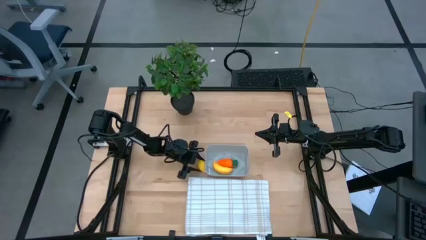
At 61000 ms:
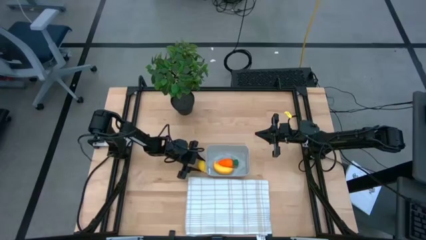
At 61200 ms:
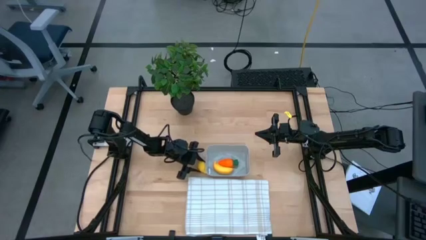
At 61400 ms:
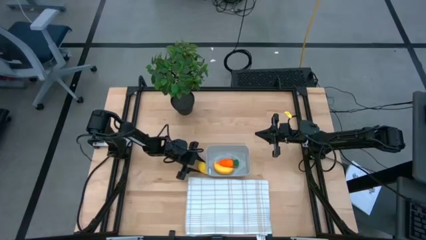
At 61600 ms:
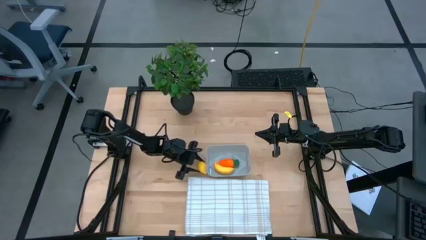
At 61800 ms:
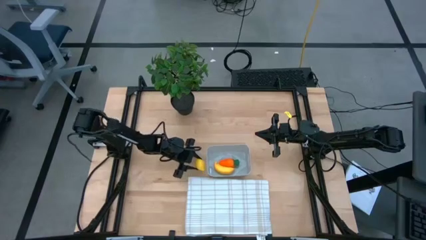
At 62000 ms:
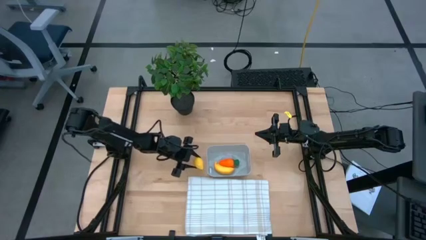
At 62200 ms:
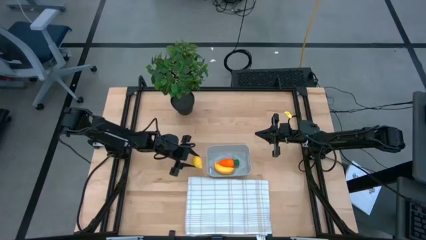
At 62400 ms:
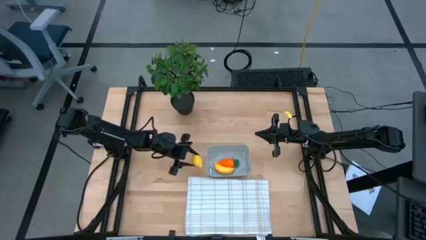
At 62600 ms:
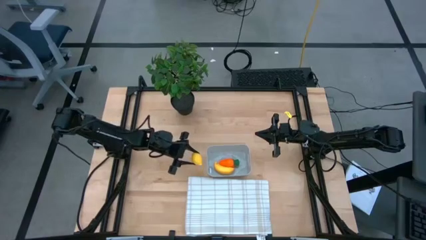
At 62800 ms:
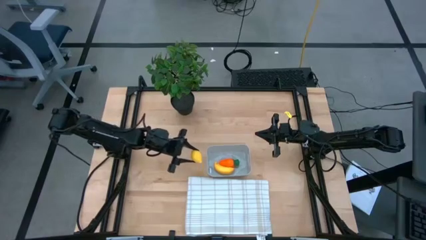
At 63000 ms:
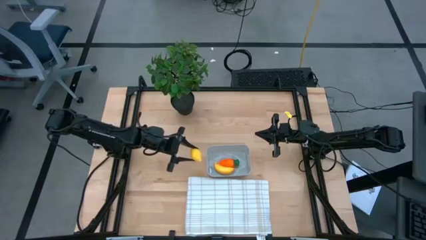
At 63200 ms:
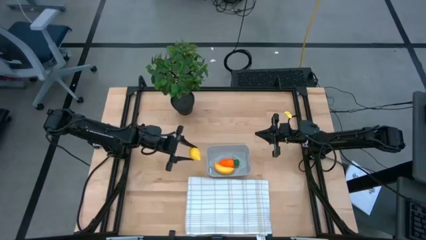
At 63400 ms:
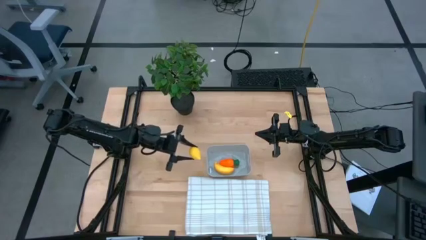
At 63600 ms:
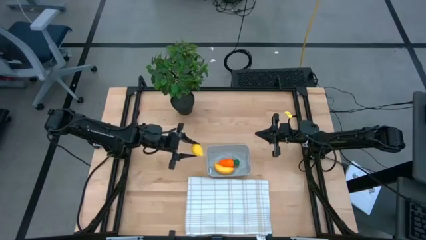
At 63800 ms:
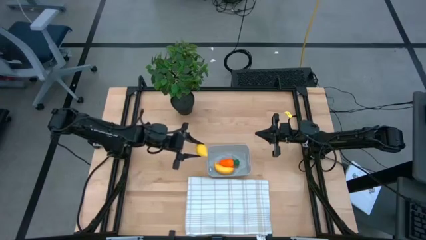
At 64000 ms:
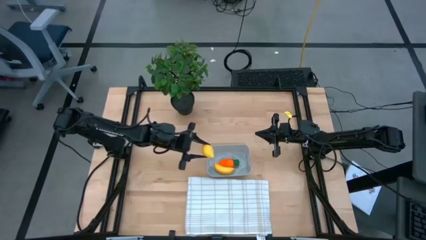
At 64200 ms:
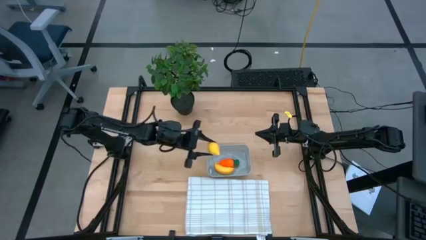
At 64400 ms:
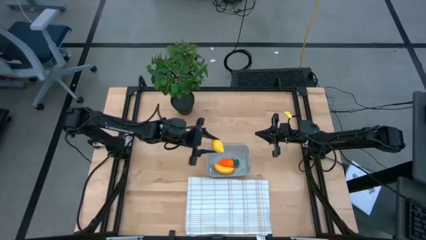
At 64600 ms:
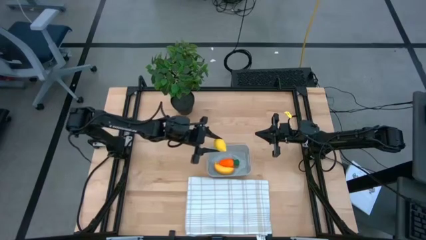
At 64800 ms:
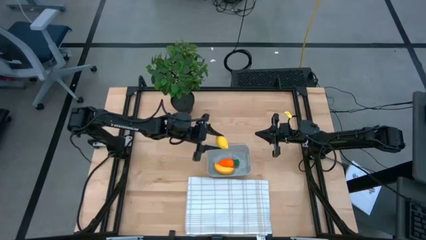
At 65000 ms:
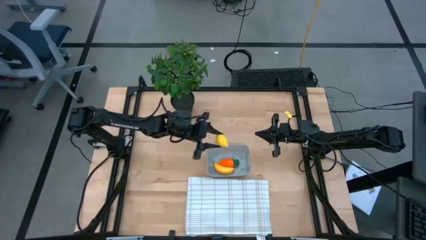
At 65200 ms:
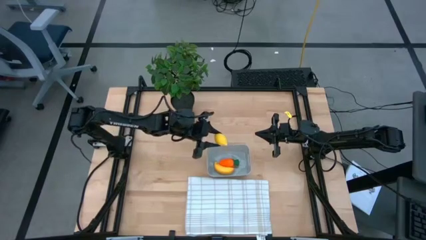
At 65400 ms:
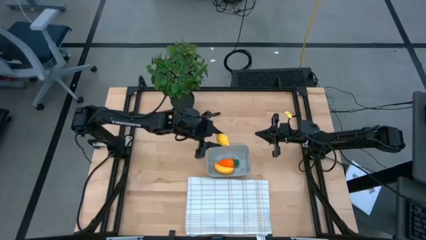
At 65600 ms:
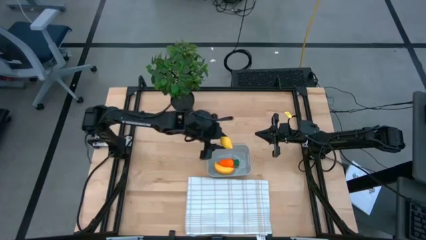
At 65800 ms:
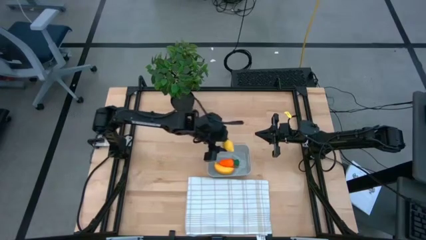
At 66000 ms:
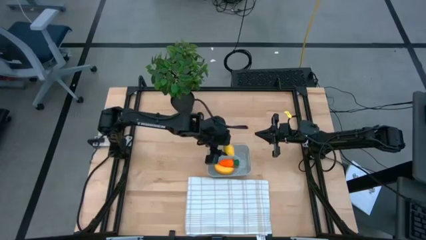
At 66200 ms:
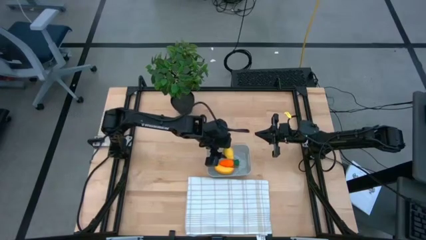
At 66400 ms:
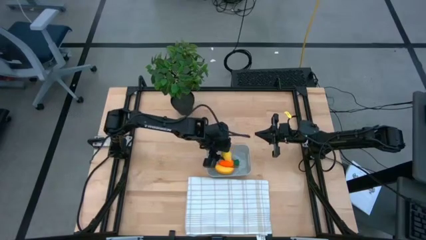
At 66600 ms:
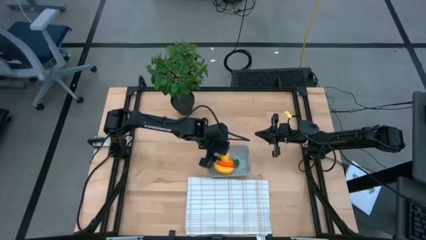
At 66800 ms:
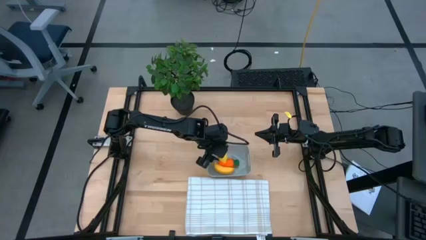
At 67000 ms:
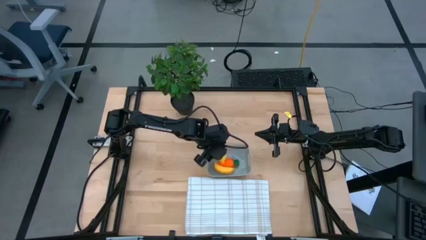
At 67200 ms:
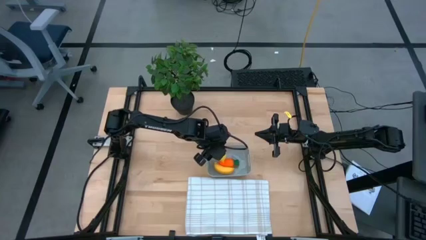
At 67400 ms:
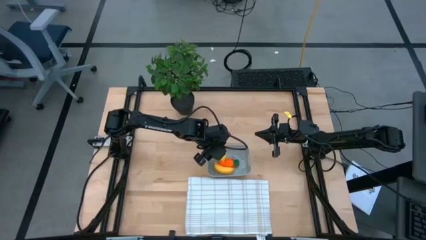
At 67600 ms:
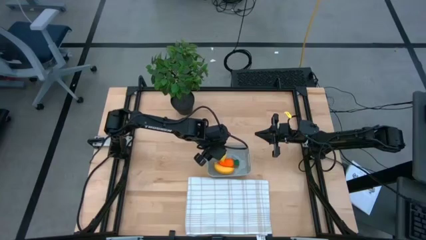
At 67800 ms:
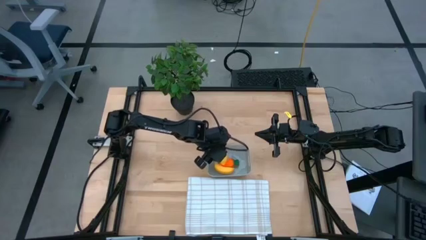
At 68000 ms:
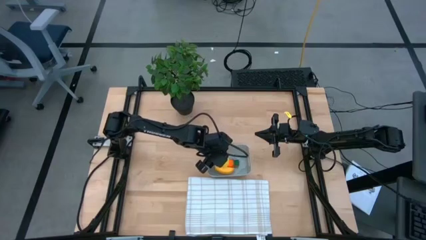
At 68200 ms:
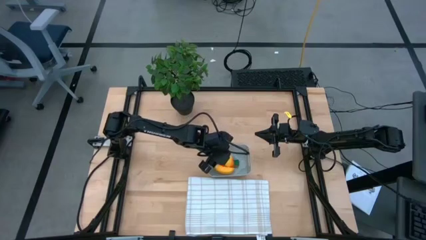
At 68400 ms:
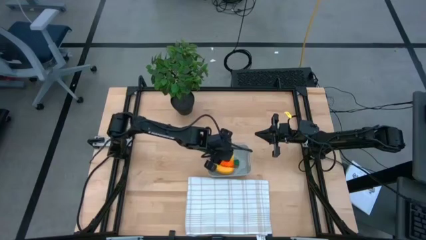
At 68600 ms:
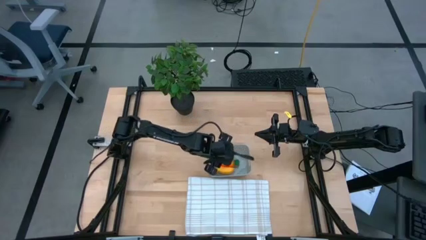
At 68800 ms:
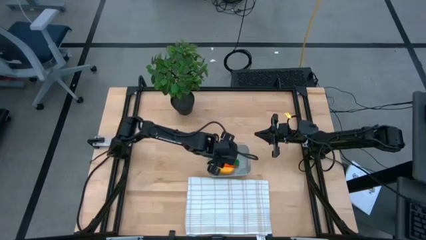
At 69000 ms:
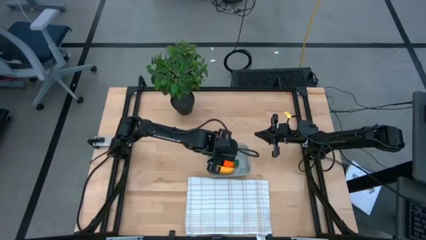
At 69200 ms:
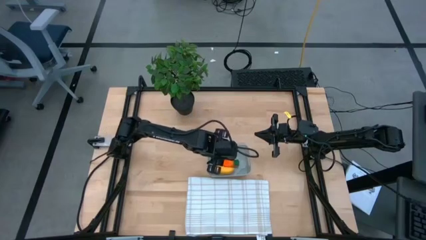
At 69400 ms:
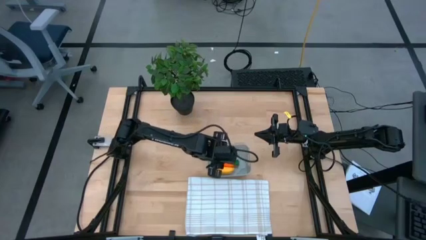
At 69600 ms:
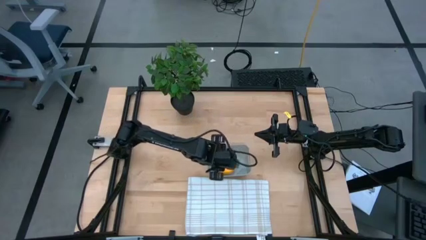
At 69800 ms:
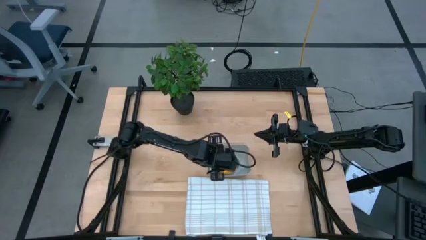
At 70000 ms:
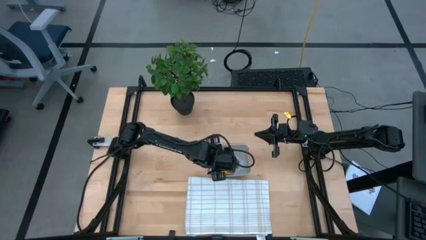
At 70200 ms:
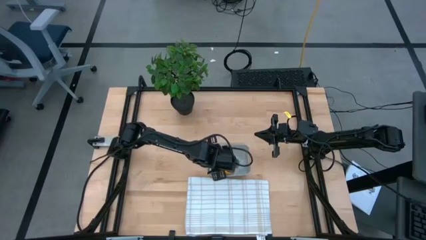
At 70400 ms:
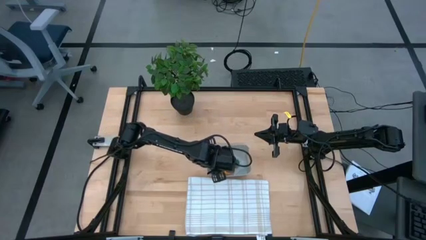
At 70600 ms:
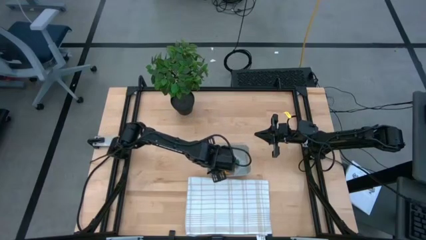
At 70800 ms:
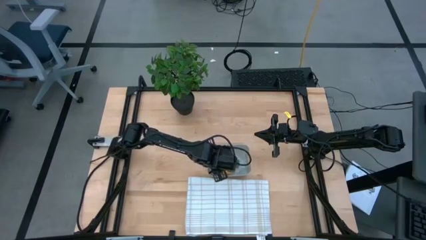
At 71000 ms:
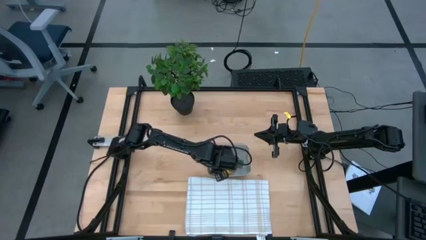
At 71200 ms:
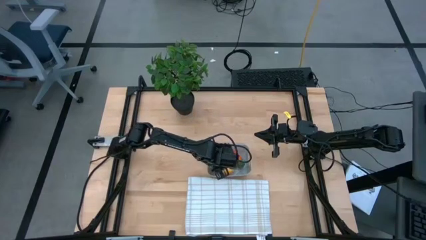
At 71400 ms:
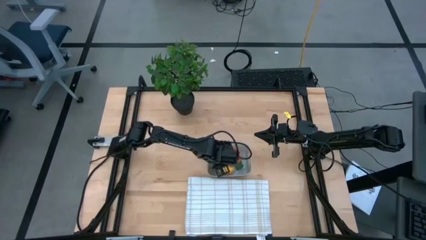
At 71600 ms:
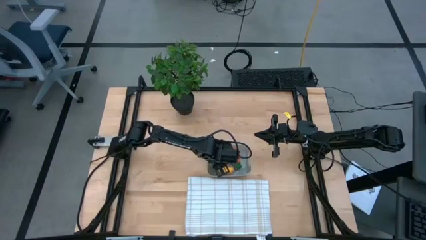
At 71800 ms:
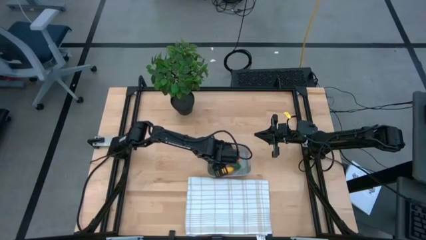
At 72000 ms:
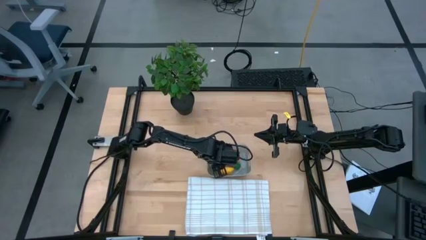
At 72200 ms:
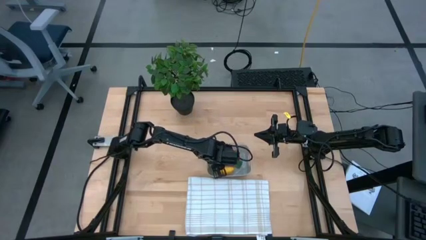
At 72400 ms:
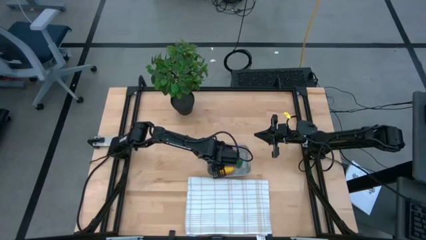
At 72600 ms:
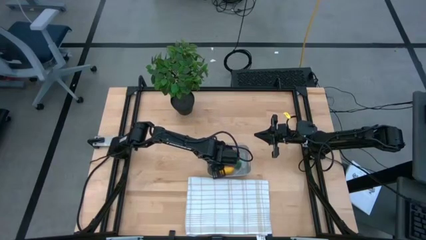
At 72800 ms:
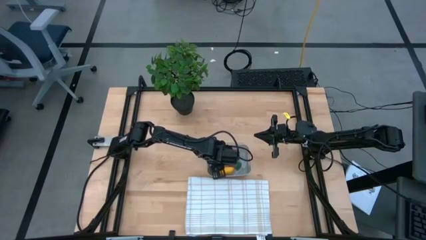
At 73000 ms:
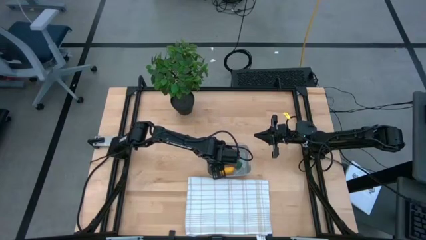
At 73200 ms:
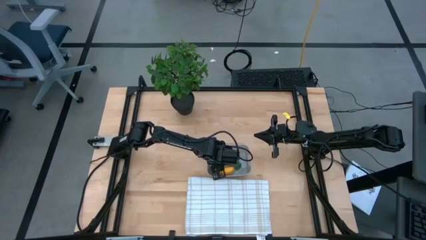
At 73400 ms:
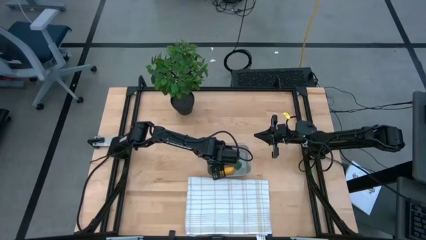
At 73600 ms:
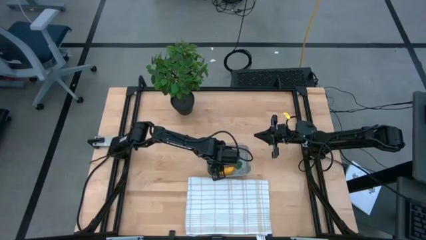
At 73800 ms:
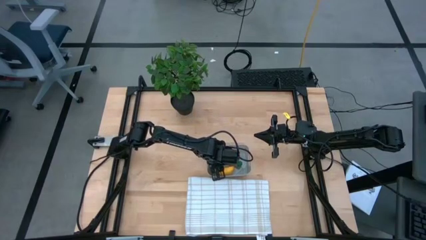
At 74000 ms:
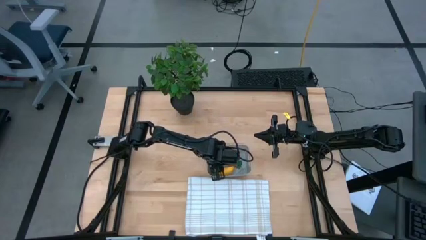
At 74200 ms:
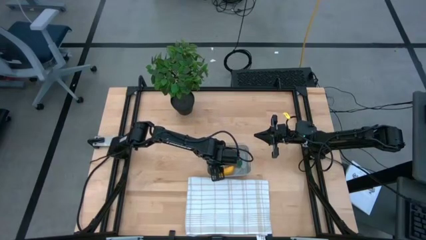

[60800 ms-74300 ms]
Task: Pick and placing Produce into tupperware
Put the lemon into the gray bin
